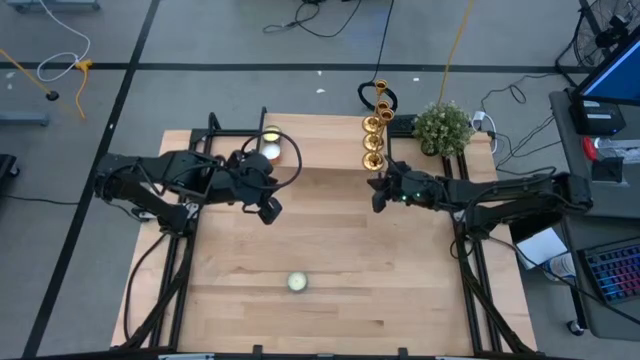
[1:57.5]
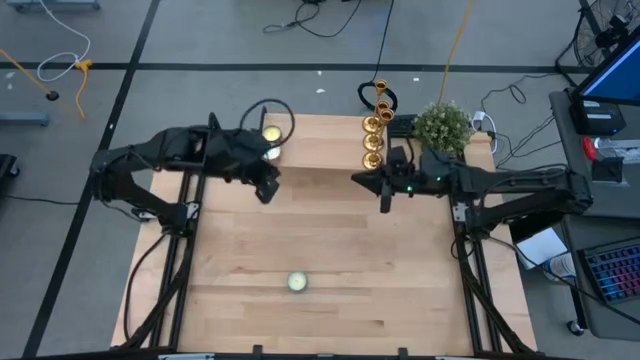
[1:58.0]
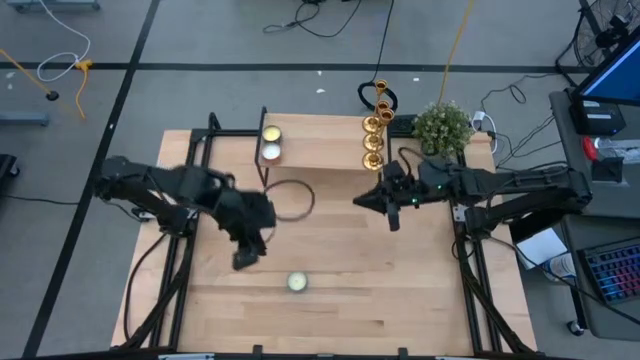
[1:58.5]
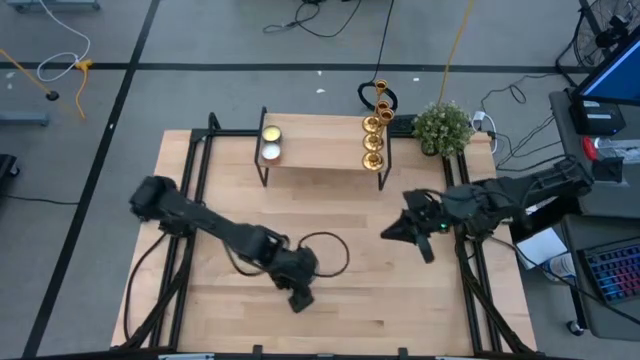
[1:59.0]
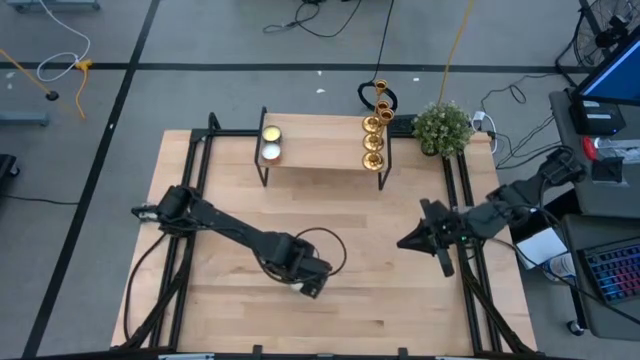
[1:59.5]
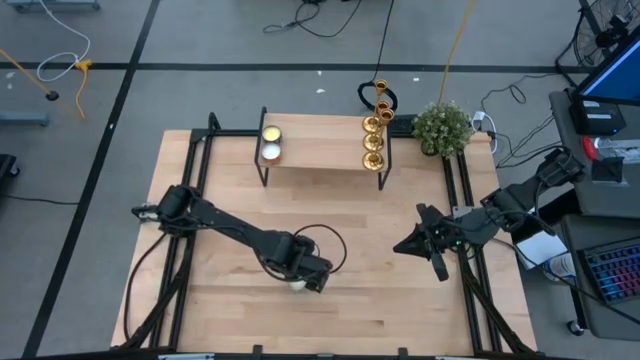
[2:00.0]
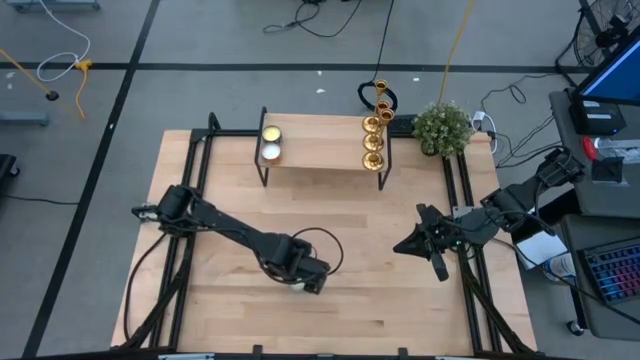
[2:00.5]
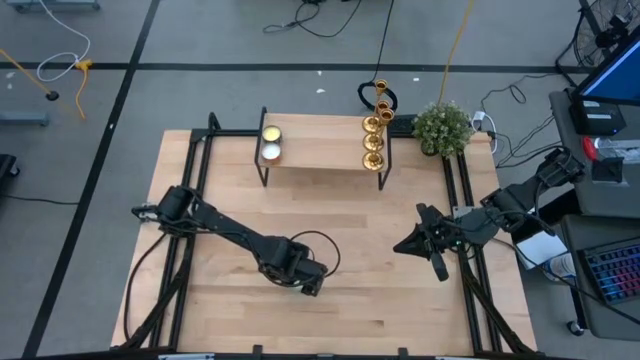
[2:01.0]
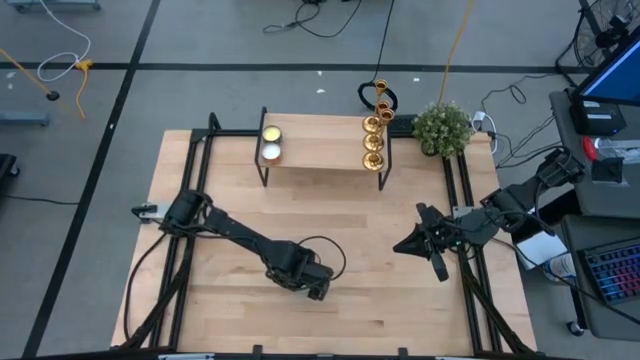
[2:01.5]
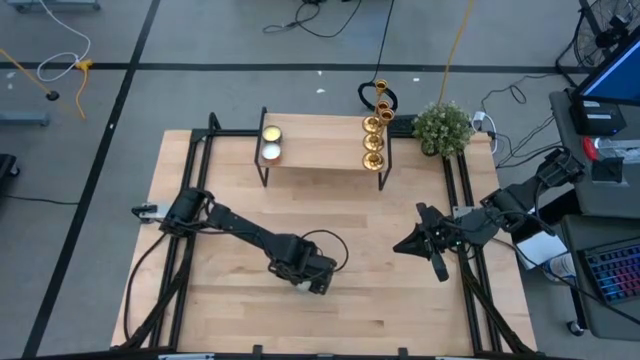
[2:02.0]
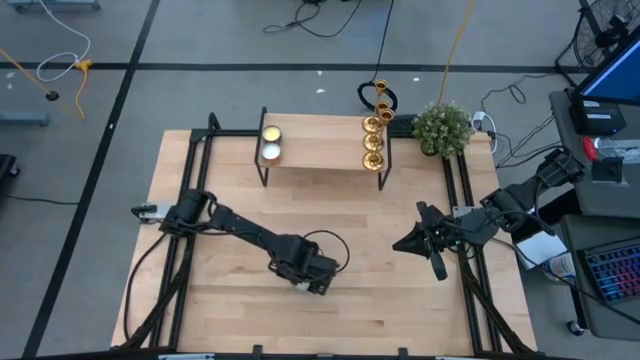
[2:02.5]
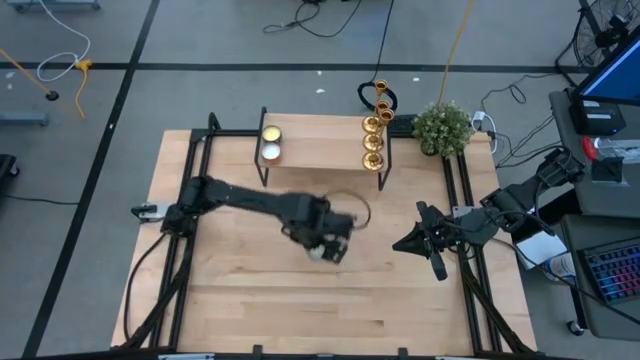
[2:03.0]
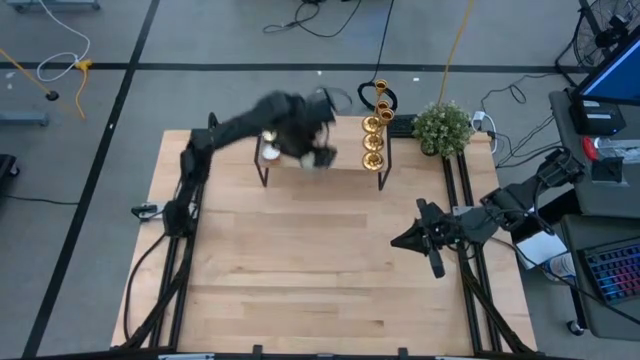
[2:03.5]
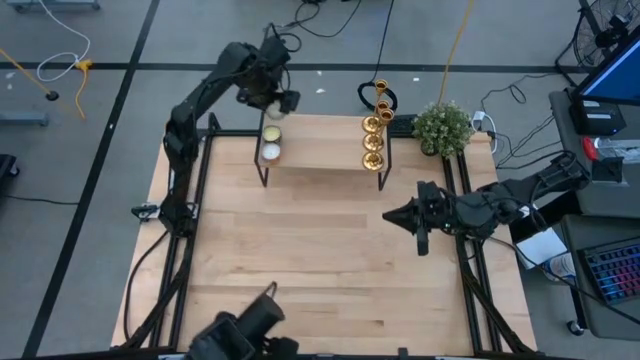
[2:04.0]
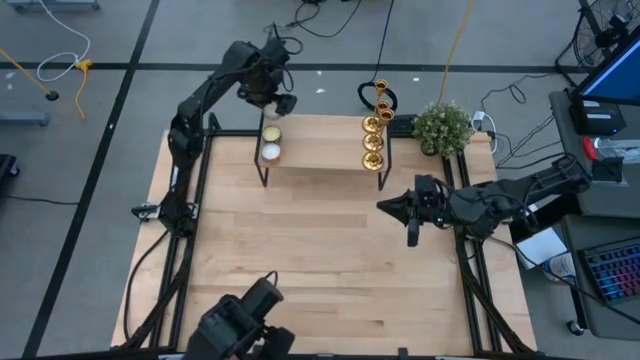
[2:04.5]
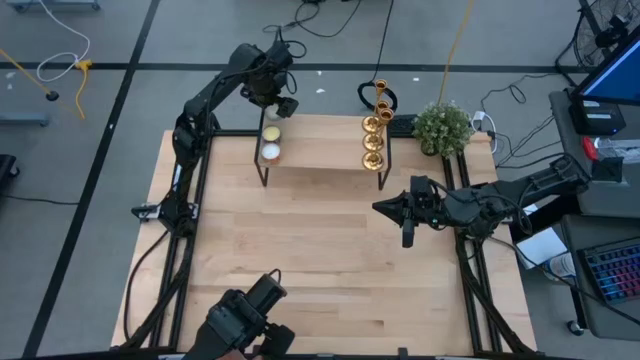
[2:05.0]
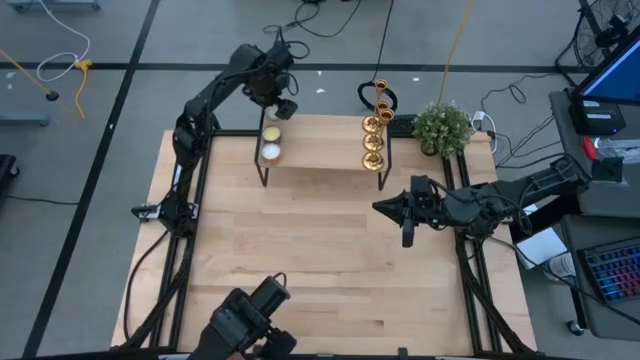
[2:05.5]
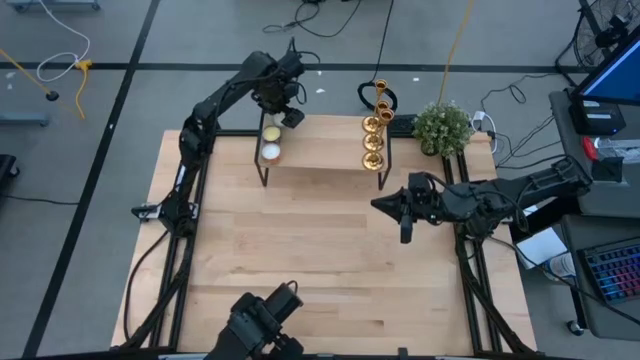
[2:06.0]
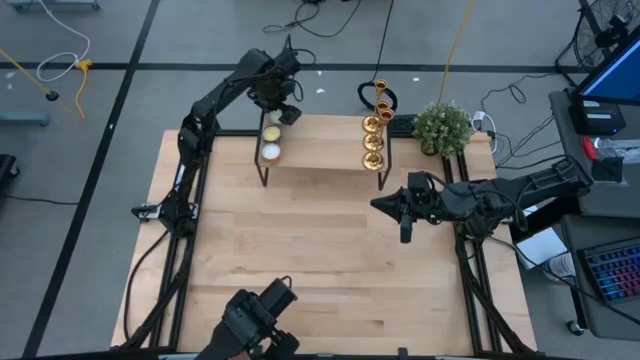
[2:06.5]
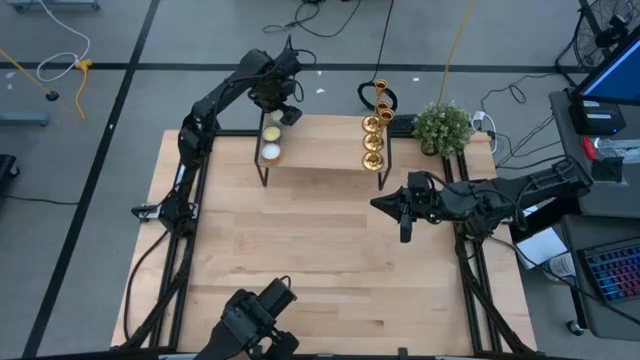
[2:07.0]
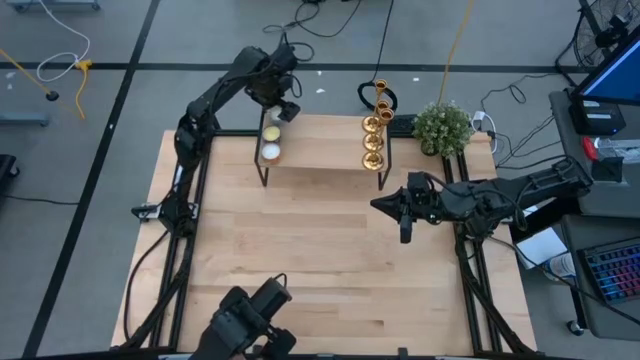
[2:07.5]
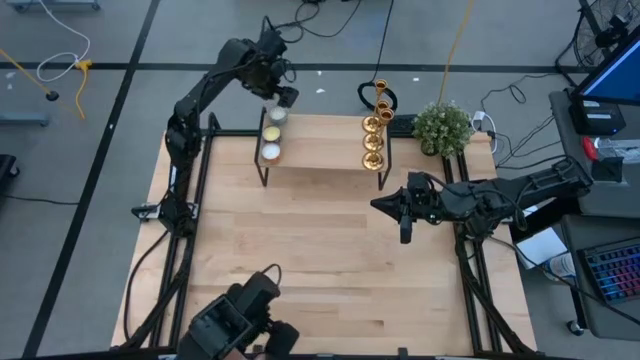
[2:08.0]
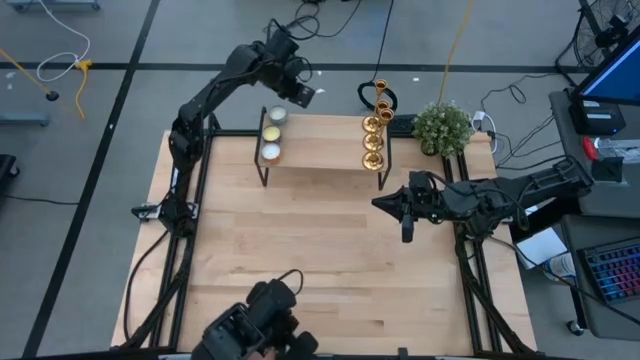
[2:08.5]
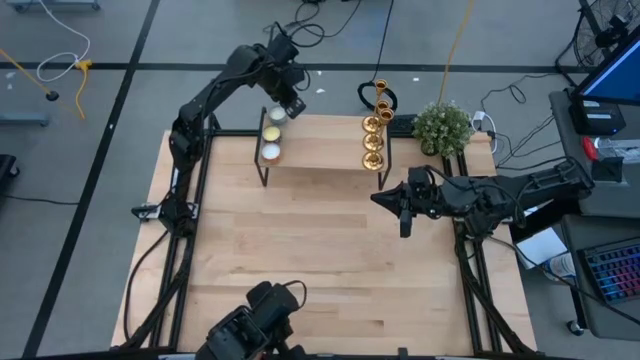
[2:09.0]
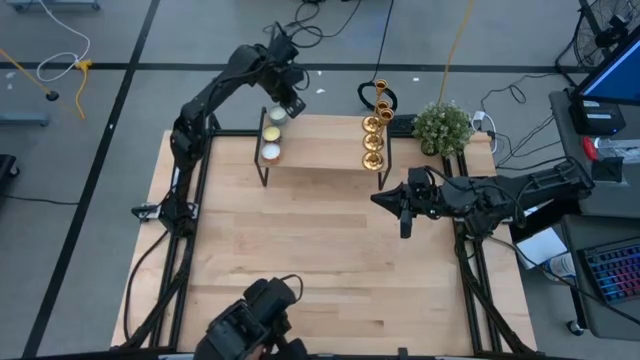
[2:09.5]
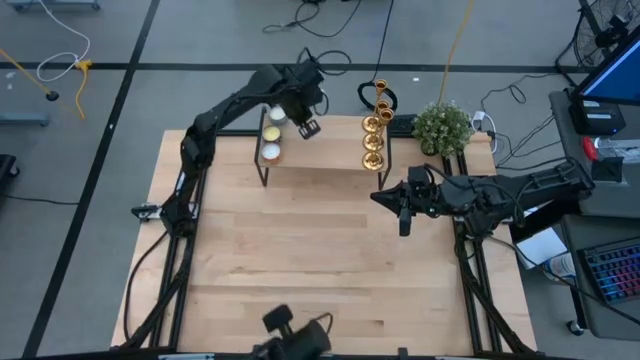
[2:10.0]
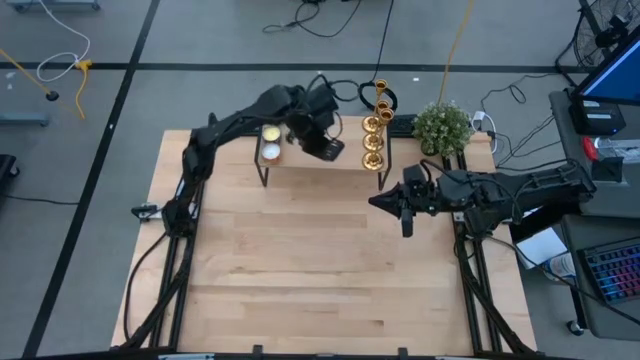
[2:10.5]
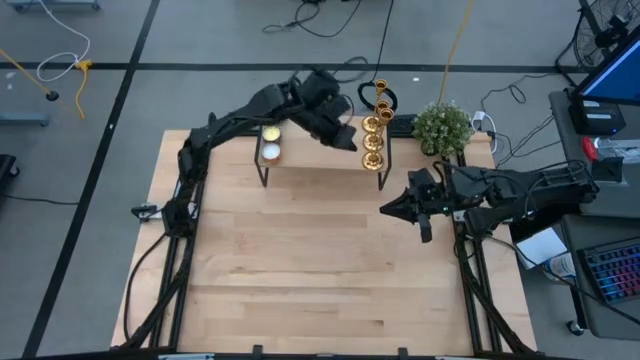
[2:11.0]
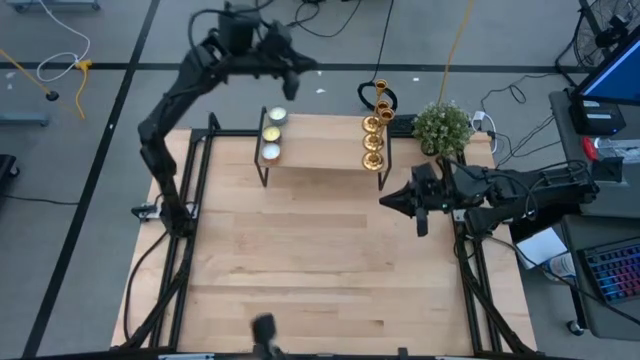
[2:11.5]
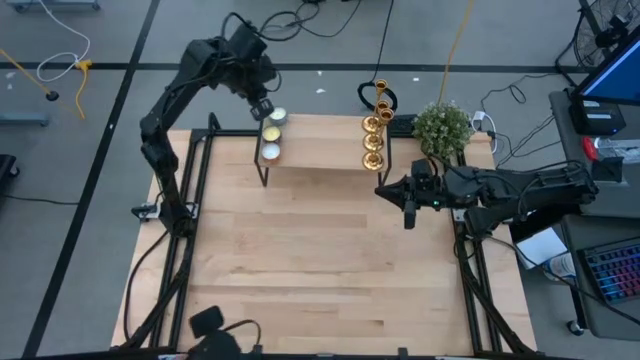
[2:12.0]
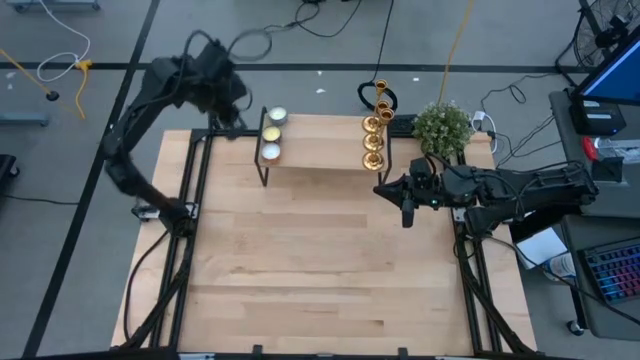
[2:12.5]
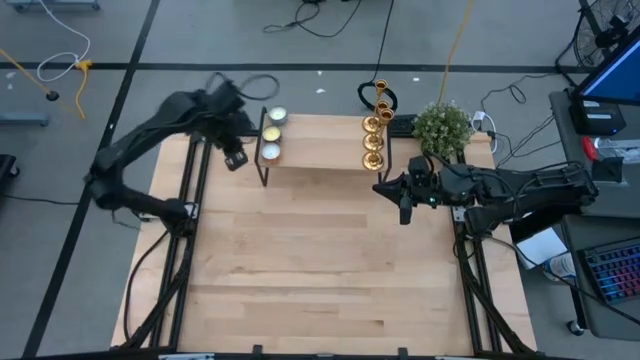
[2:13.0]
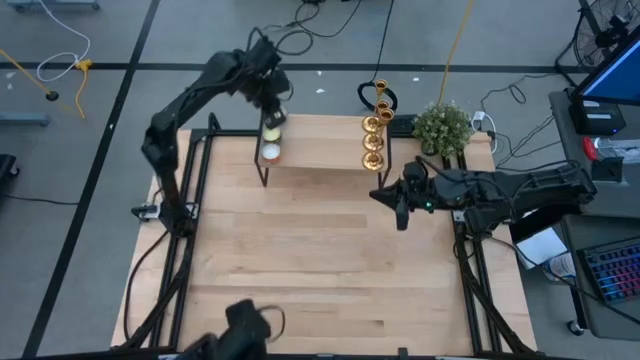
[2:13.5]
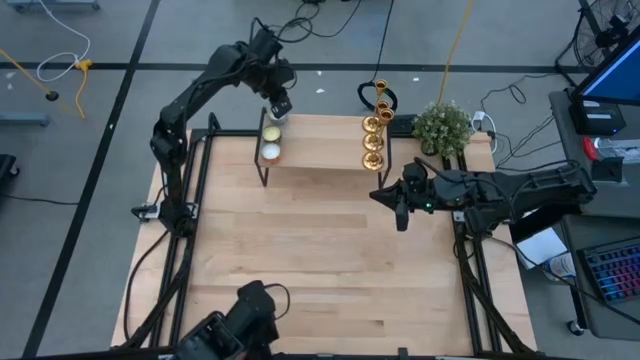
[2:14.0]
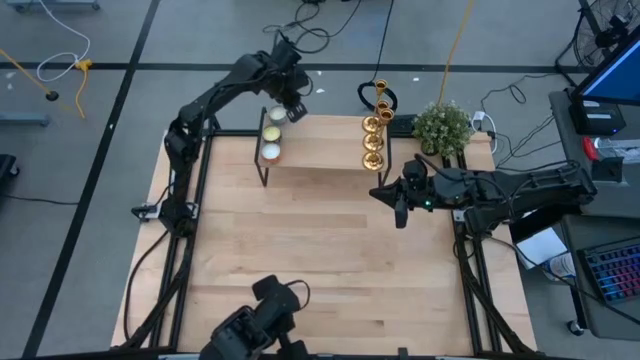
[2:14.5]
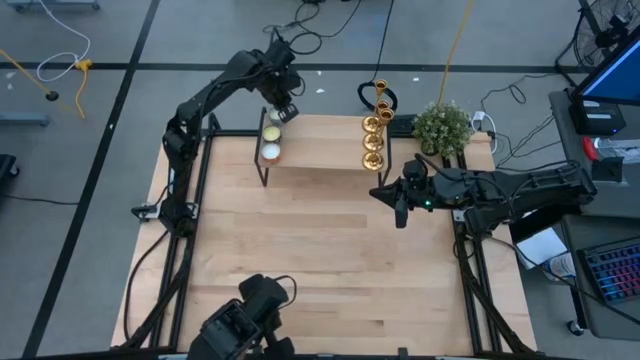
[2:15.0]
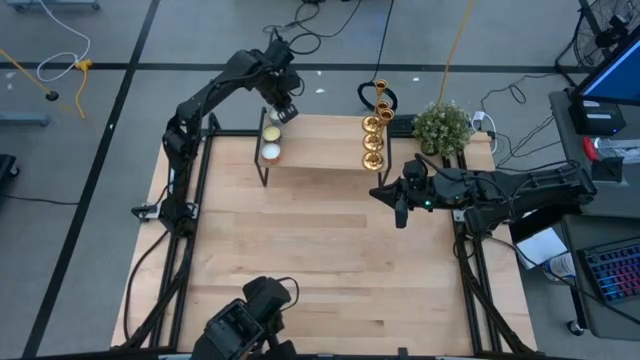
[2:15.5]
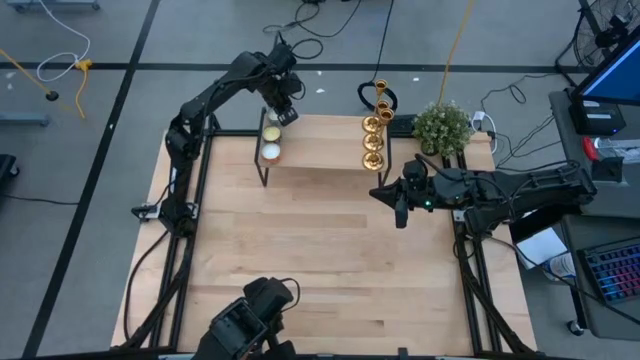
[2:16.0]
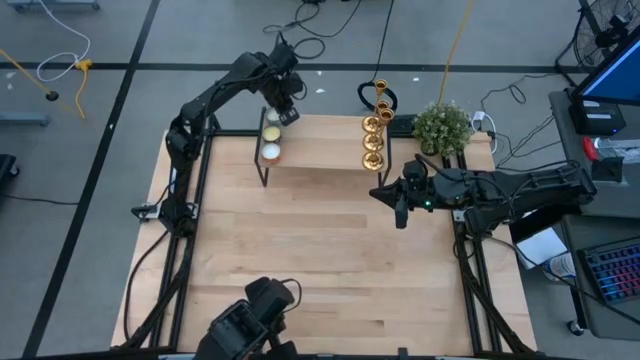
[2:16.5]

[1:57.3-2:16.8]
Task: Pick & Place candle stick holders
Put the light blue scented candle aligned with the black scented candle on the shelf

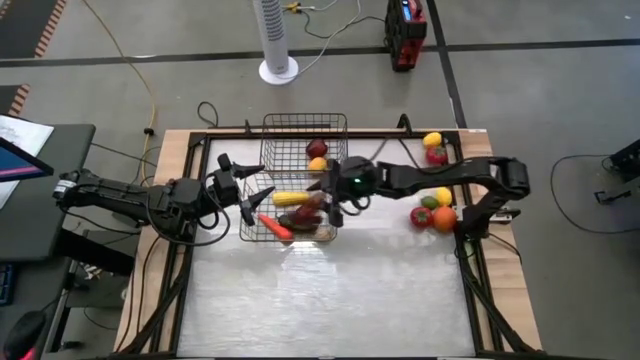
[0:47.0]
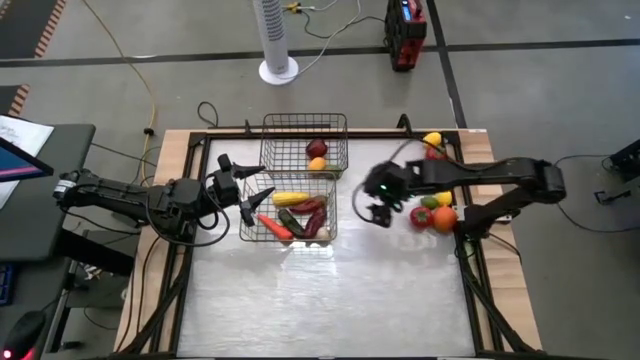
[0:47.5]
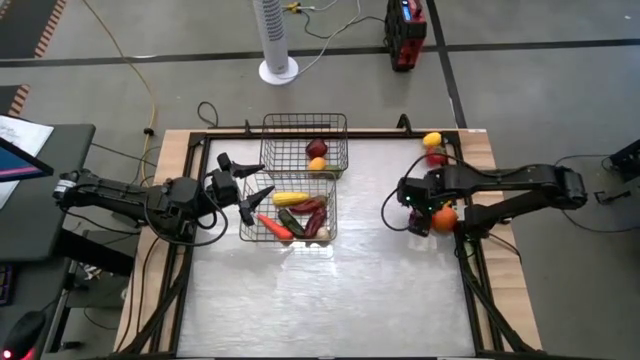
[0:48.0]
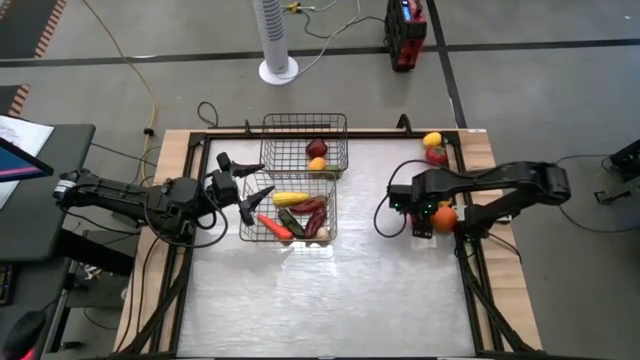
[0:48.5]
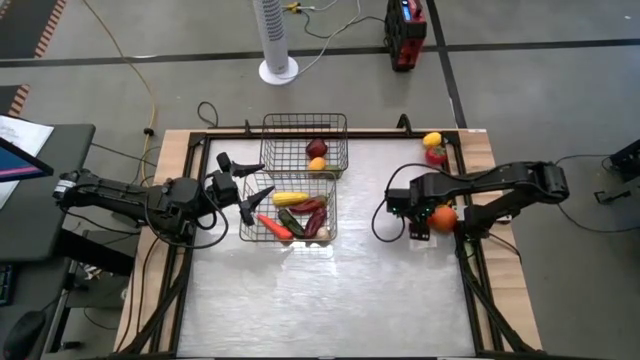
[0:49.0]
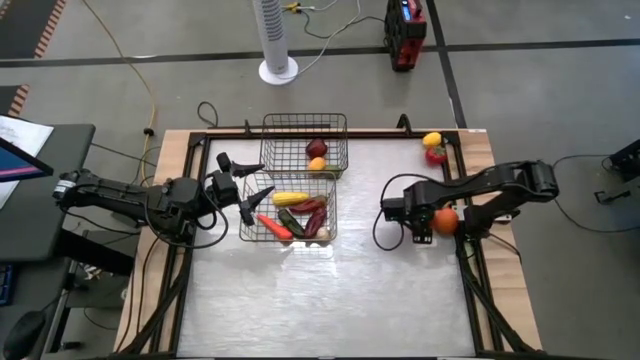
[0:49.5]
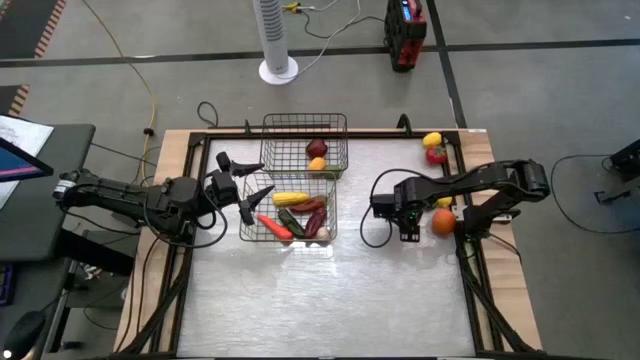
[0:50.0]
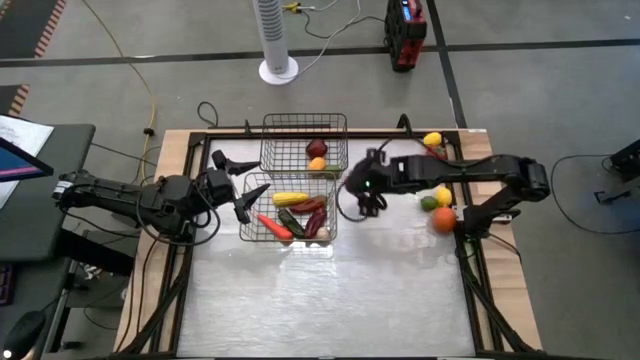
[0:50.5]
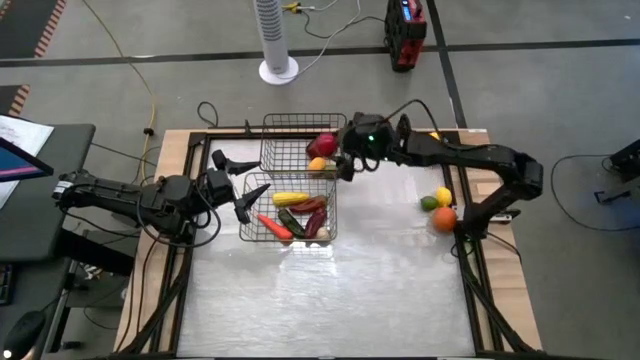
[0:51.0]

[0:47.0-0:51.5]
Task: Sort produce into baskets
Put the tomato into the top wire basket
